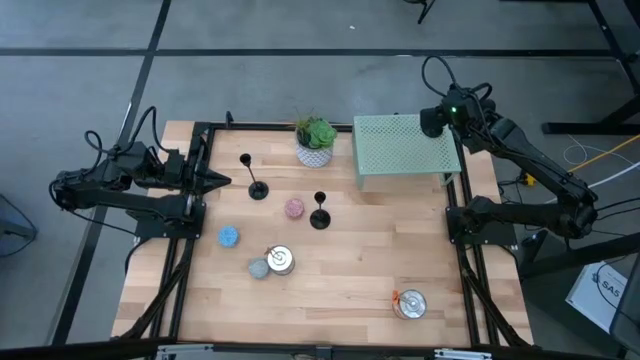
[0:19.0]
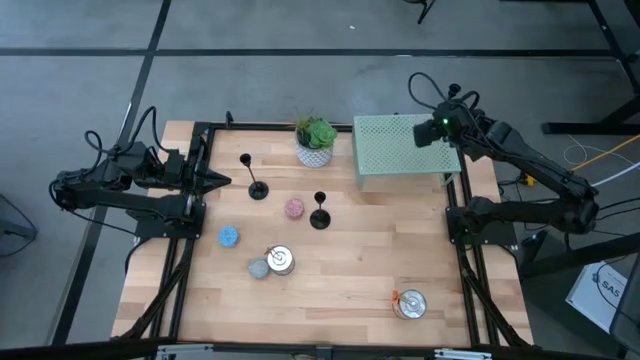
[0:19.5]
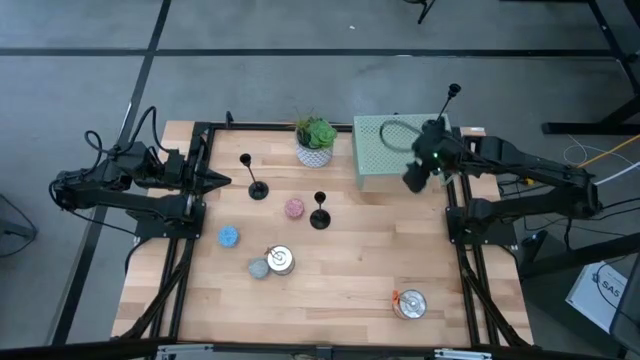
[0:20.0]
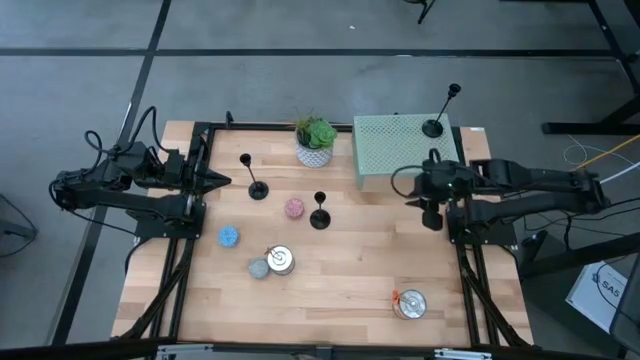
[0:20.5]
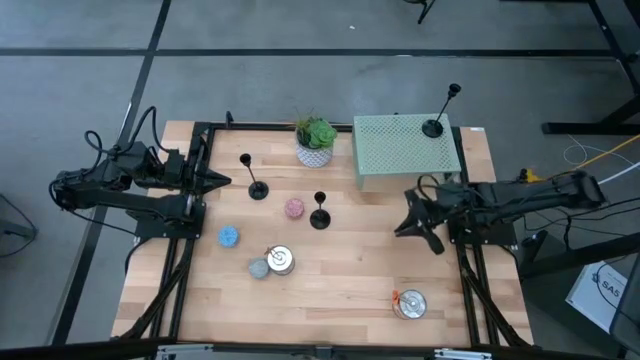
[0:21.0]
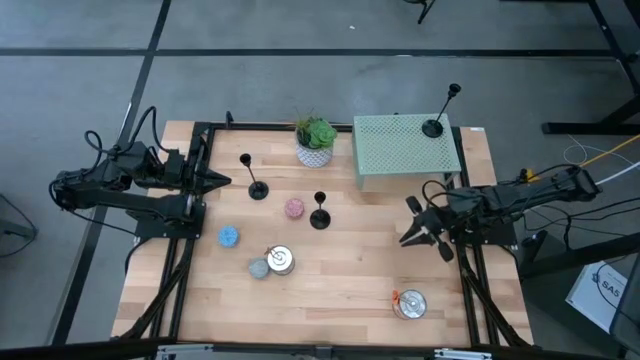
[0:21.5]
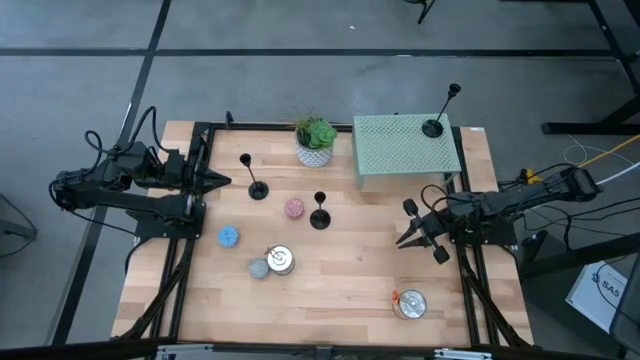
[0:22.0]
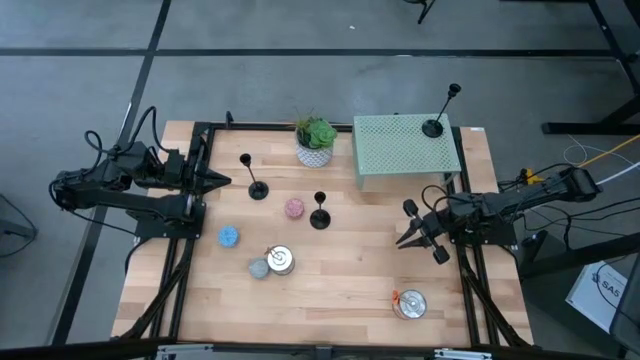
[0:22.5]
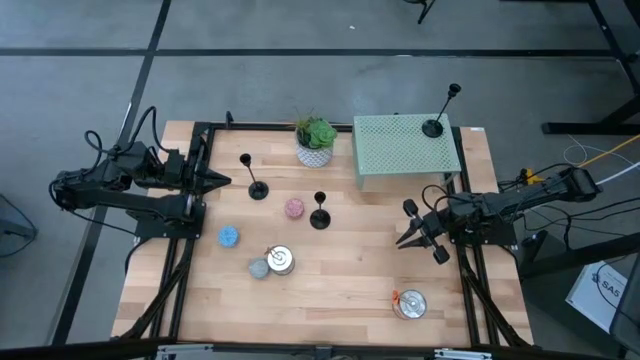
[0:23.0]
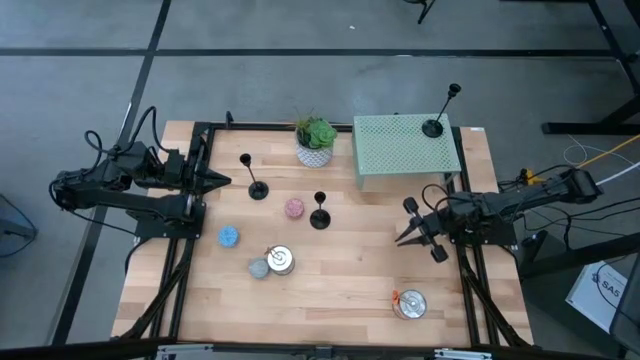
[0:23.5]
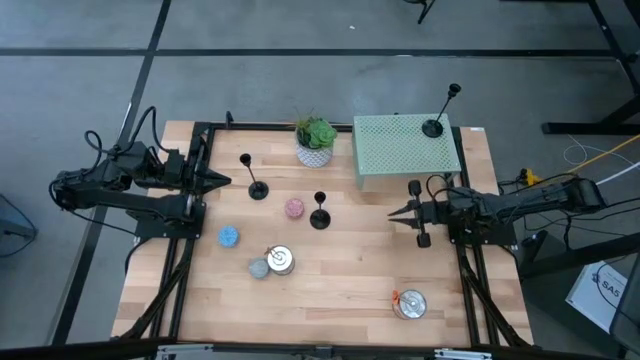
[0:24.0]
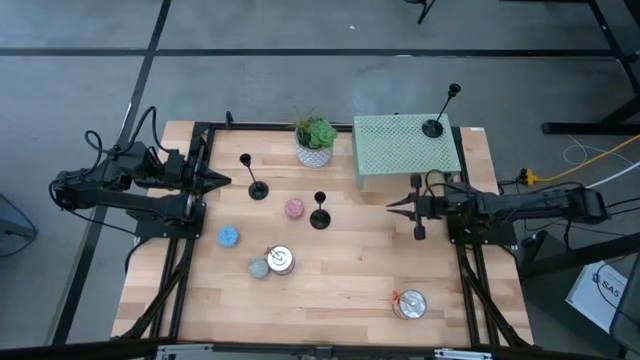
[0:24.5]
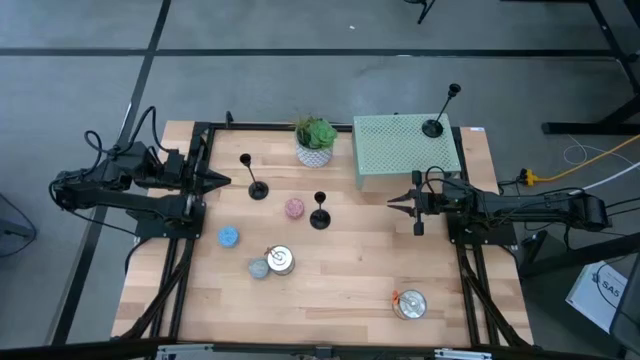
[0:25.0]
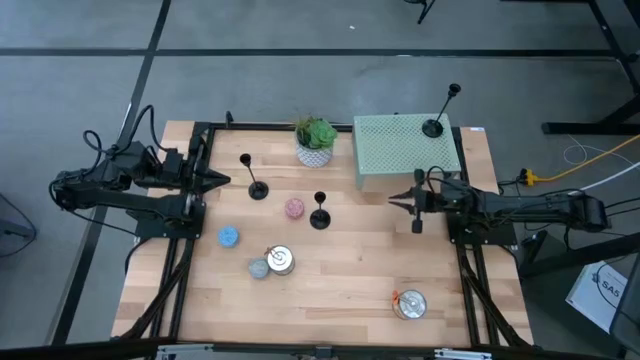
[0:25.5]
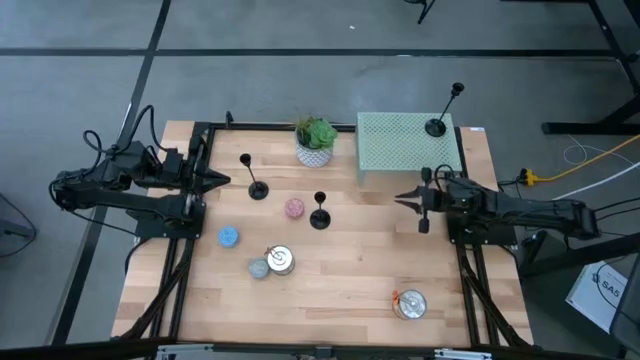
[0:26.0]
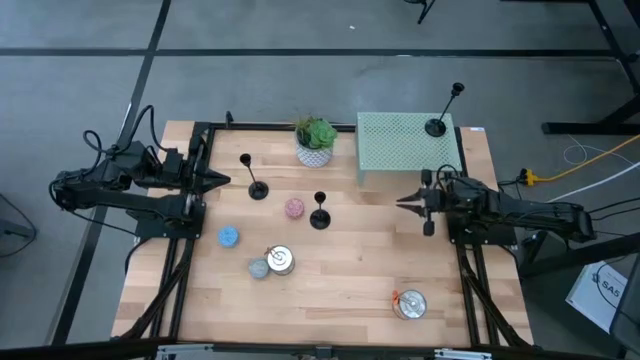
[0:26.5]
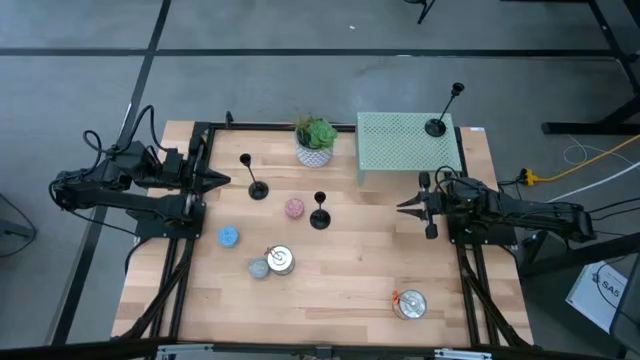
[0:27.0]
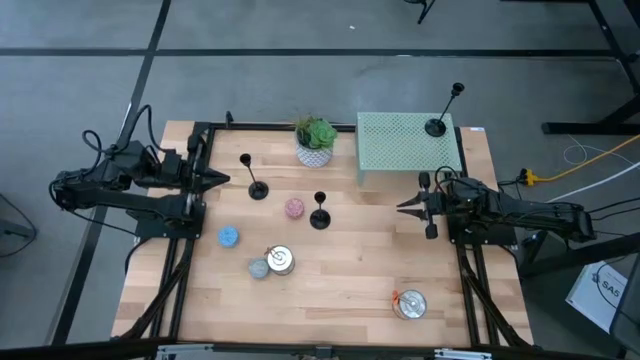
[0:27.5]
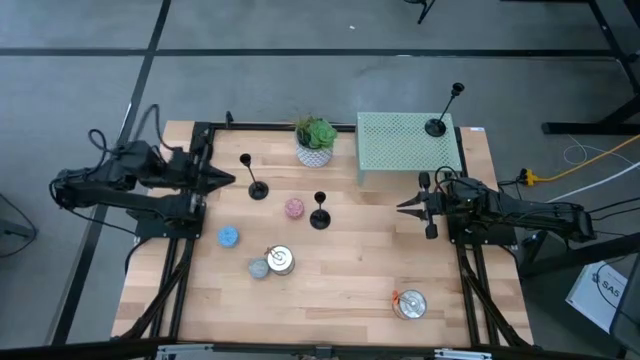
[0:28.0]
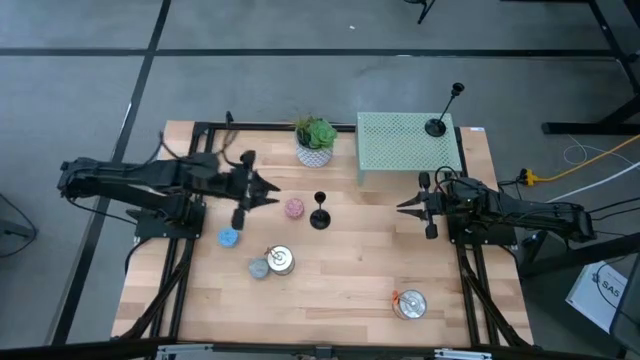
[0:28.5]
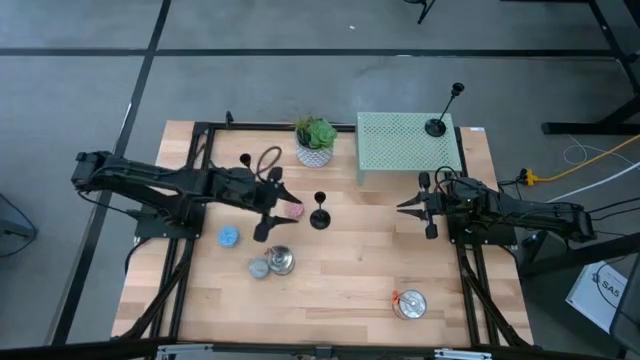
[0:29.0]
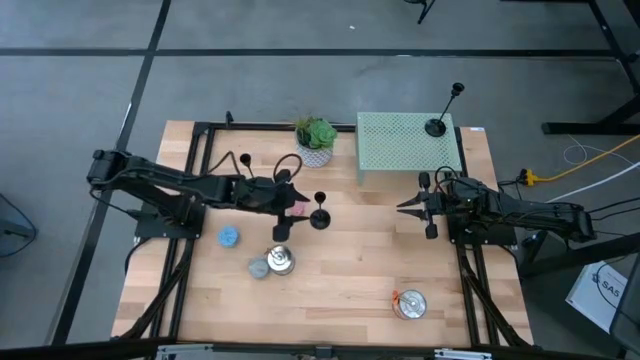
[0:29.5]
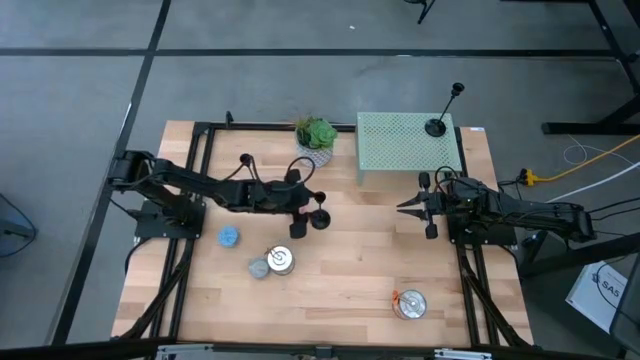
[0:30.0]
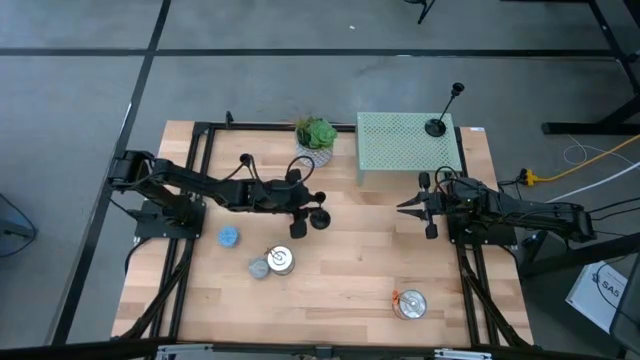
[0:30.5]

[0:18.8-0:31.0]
Task: Pick & Place candle stick holders
Put the right black candle holder and aligned with other black candle holder on the shelf

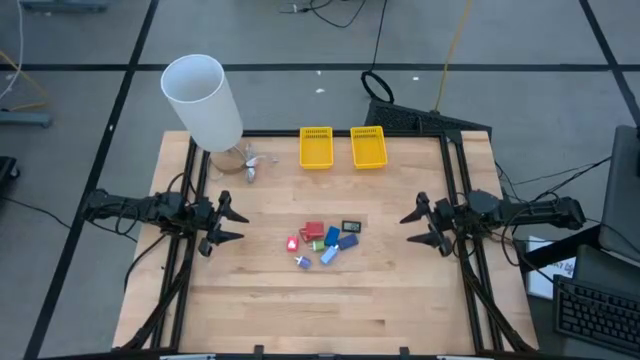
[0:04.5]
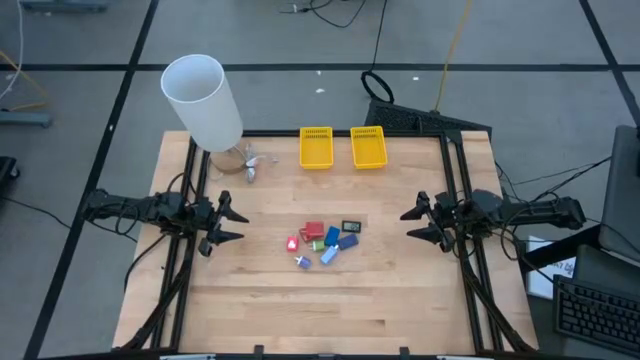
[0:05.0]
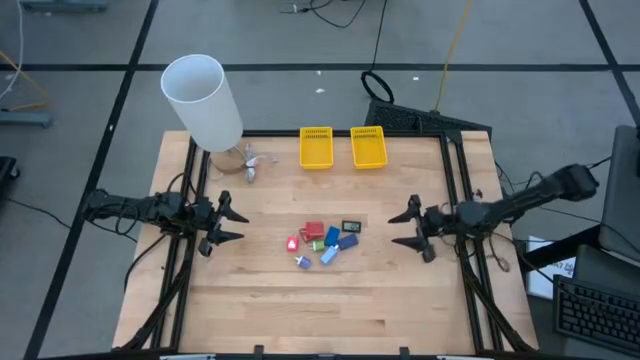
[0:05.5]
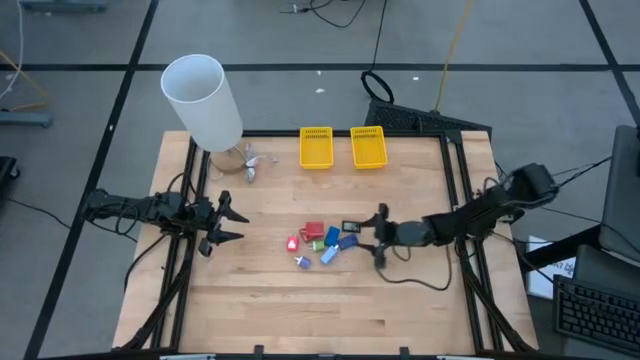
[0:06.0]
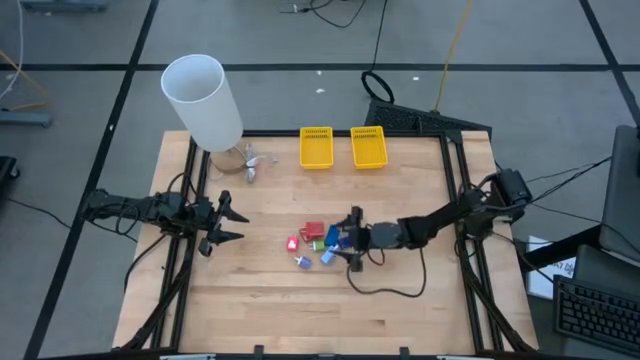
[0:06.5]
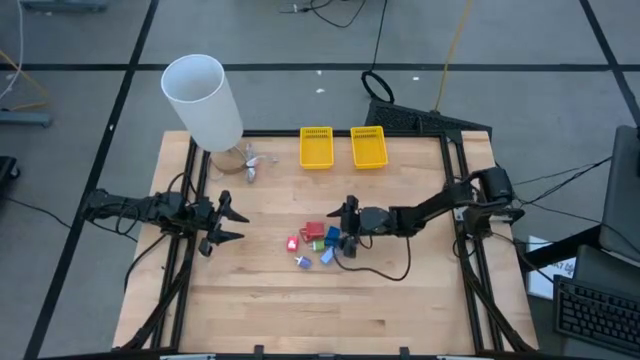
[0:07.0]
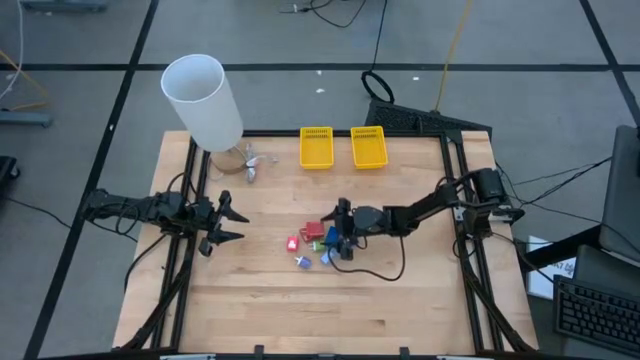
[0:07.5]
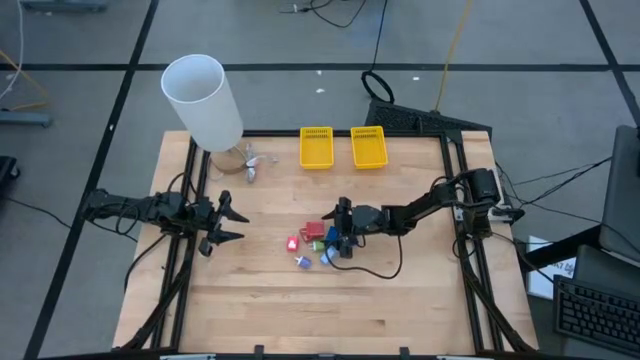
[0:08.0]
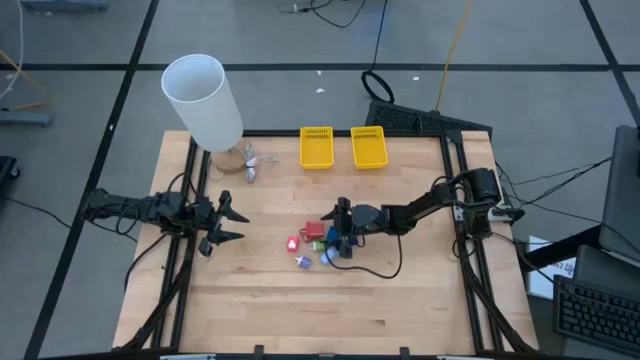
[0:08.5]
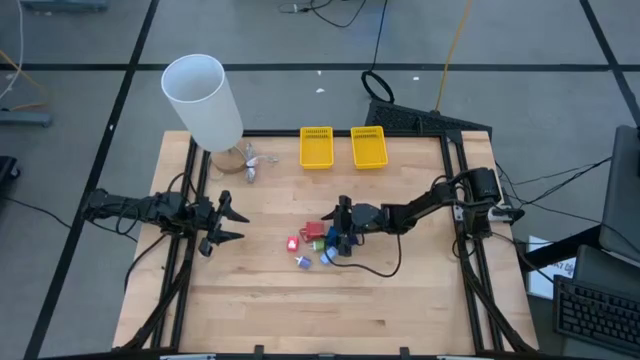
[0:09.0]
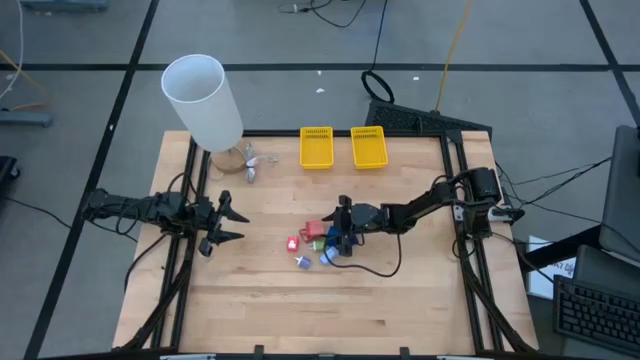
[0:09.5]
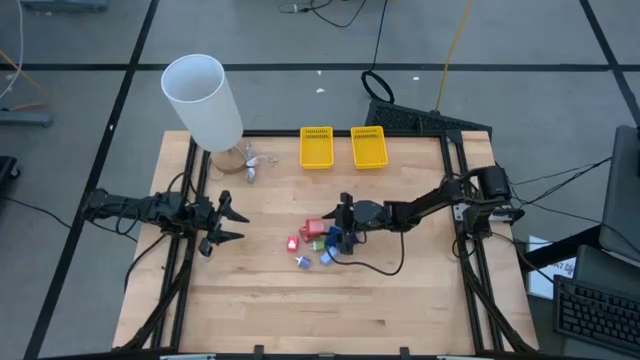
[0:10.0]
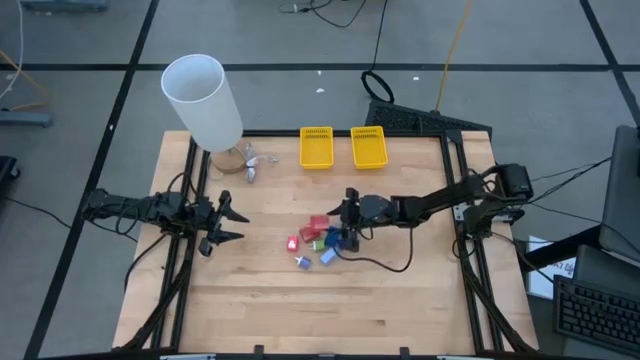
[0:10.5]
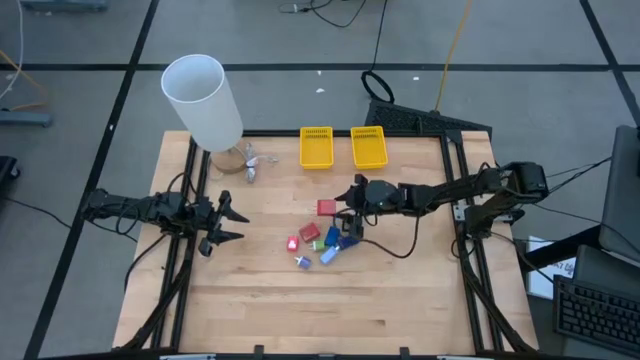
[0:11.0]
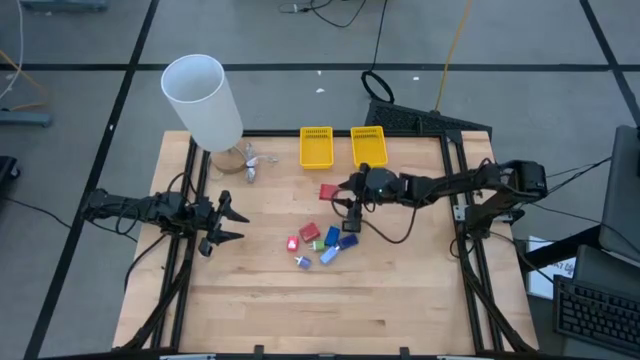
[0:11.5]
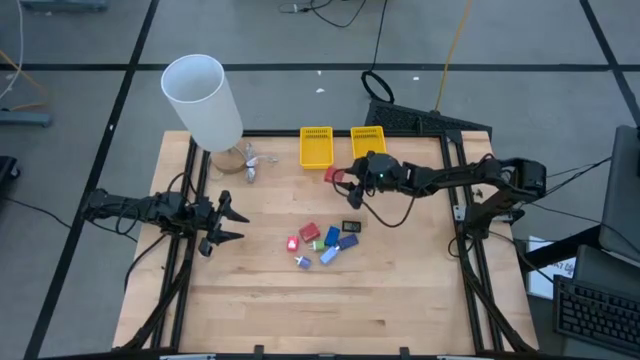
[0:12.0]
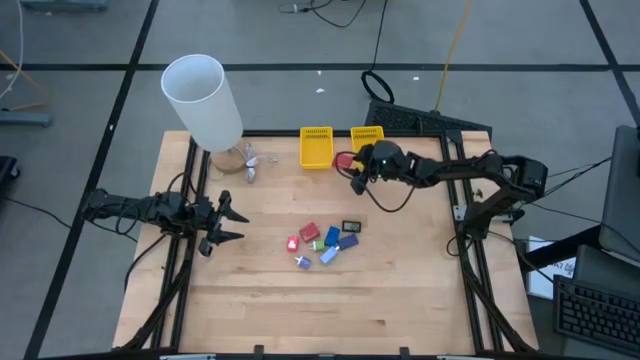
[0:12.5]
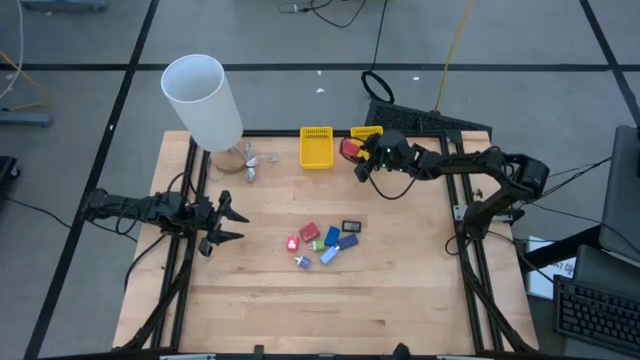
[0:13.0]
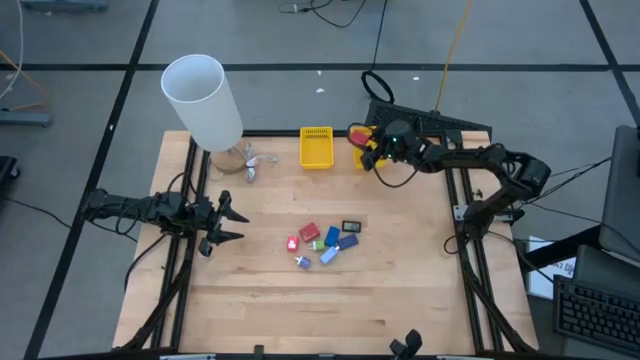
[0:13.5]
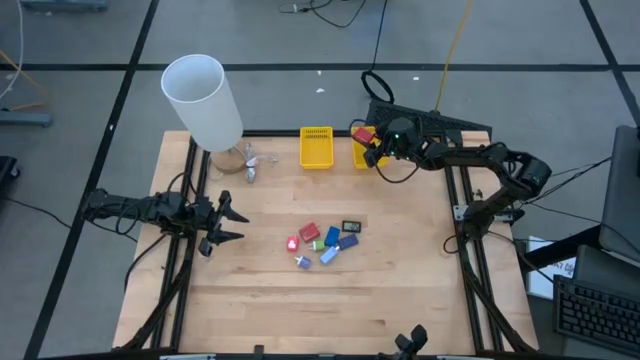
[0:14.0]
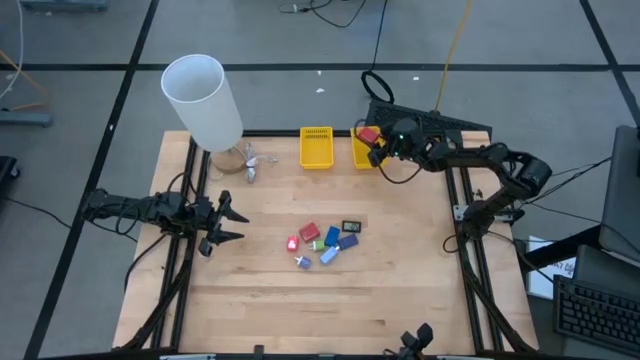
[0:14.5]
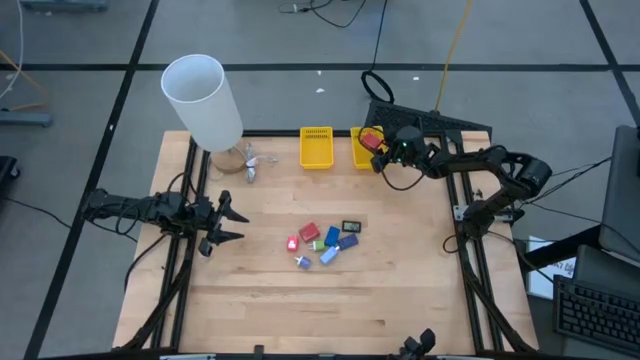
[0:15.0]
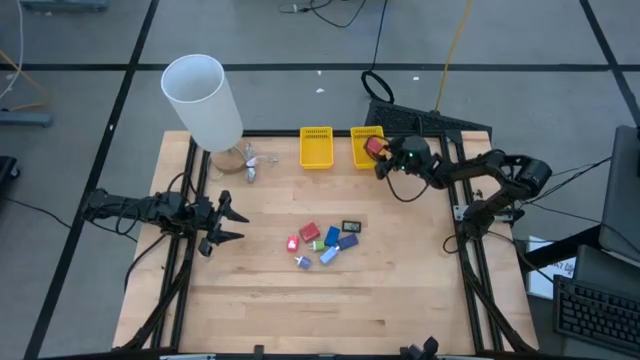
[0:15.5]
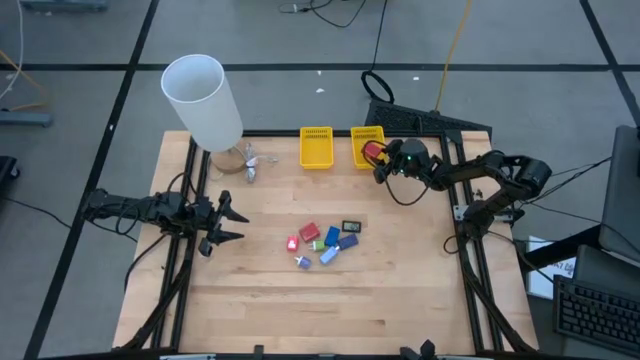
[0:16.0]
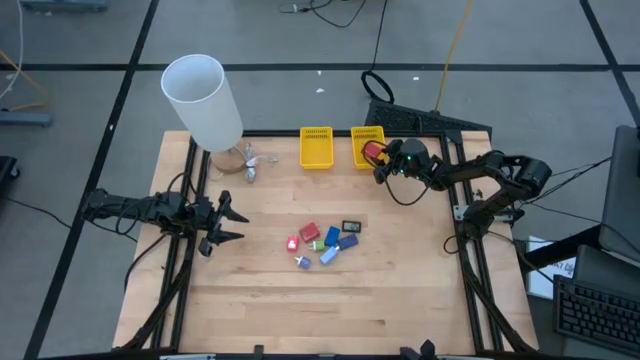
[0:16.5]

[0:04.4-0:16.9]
Task: Pick & Place Office items
Put the top red charger adapter into the right yellow bin
